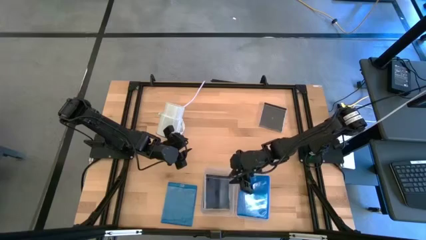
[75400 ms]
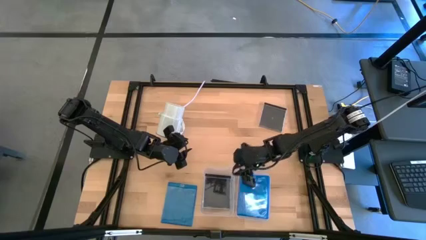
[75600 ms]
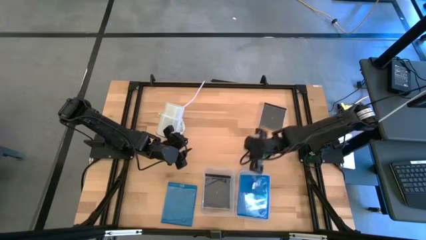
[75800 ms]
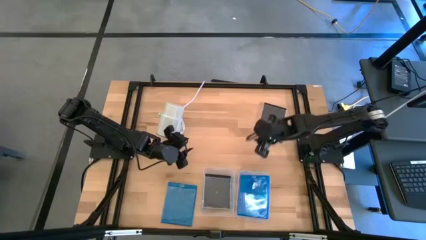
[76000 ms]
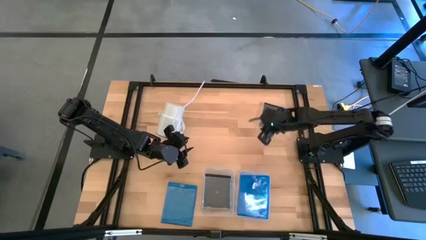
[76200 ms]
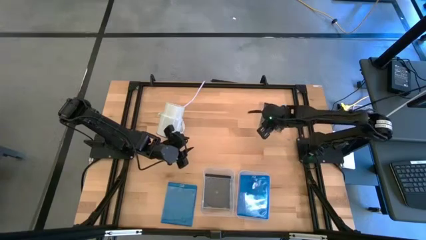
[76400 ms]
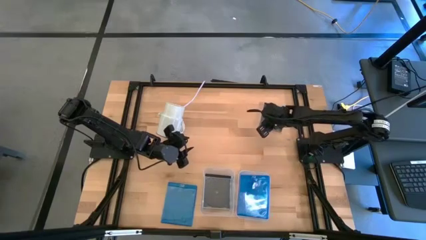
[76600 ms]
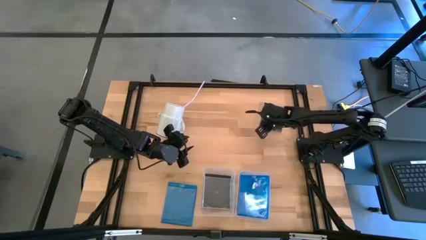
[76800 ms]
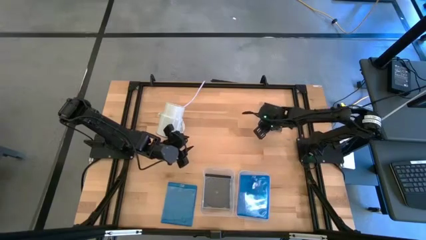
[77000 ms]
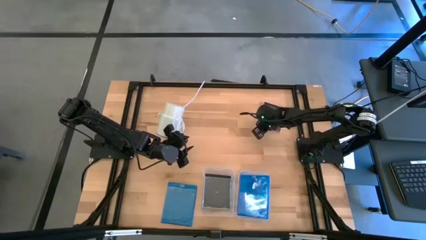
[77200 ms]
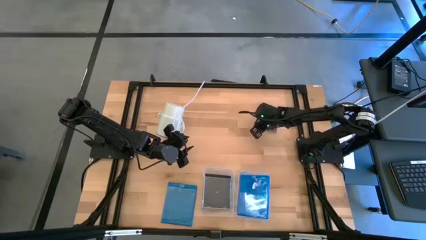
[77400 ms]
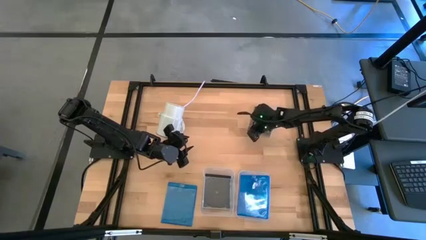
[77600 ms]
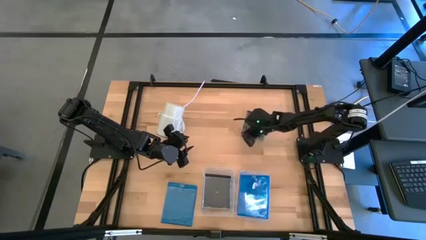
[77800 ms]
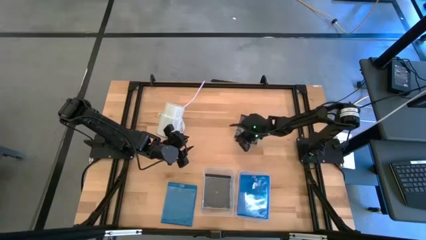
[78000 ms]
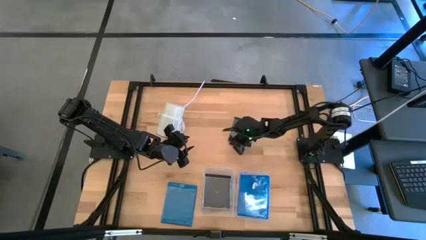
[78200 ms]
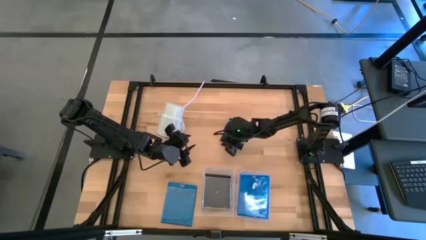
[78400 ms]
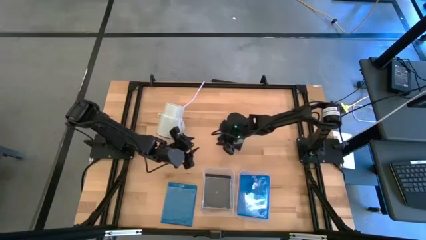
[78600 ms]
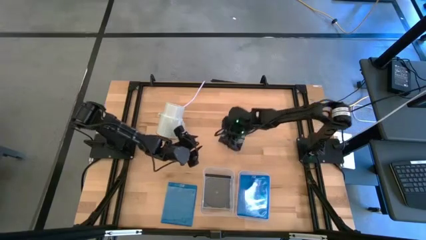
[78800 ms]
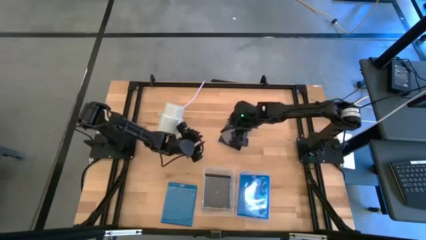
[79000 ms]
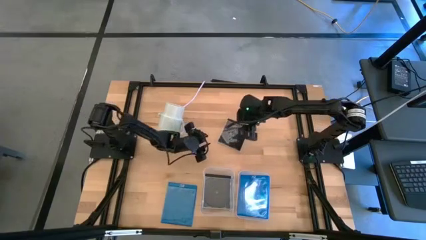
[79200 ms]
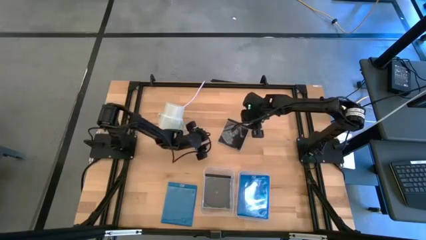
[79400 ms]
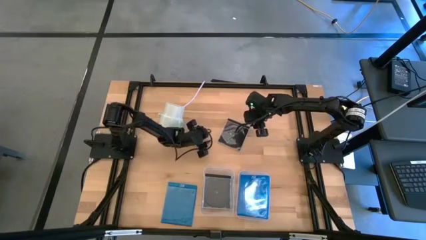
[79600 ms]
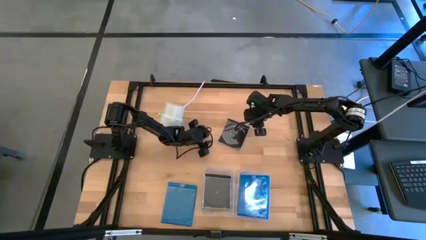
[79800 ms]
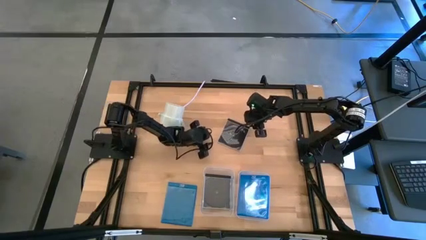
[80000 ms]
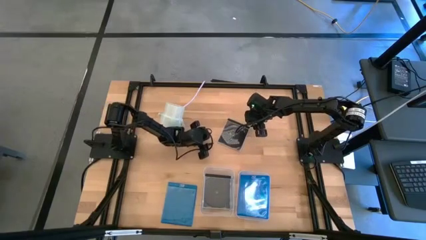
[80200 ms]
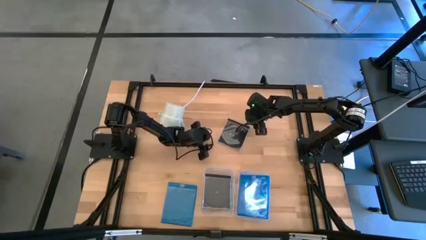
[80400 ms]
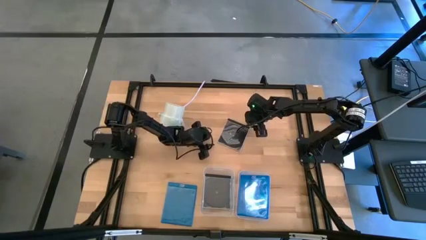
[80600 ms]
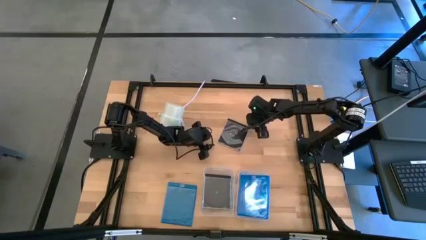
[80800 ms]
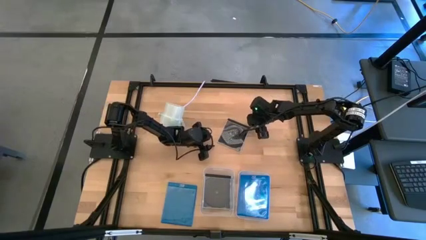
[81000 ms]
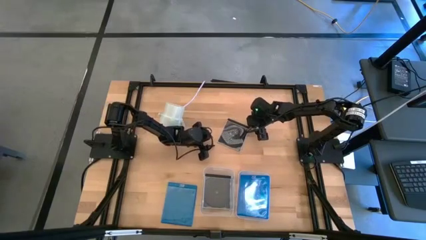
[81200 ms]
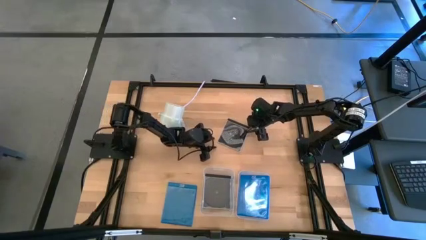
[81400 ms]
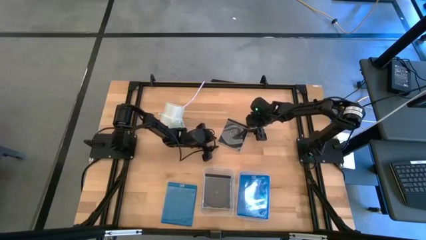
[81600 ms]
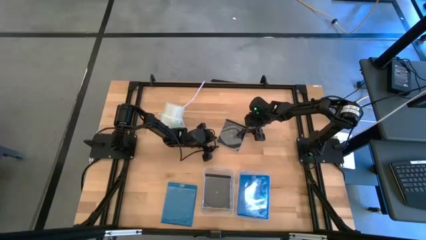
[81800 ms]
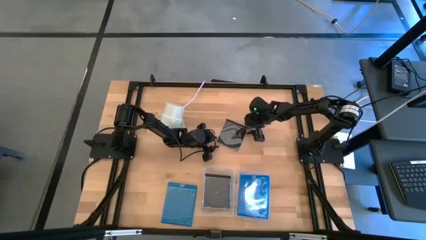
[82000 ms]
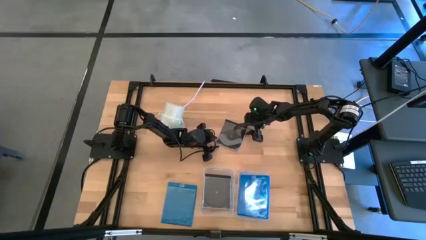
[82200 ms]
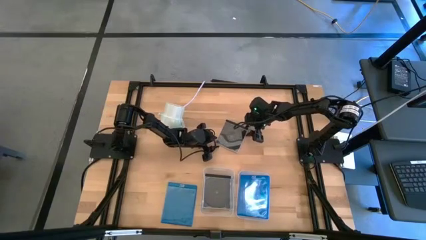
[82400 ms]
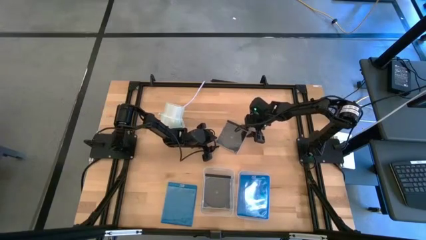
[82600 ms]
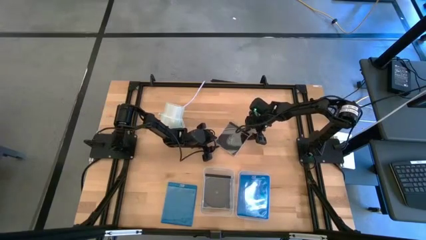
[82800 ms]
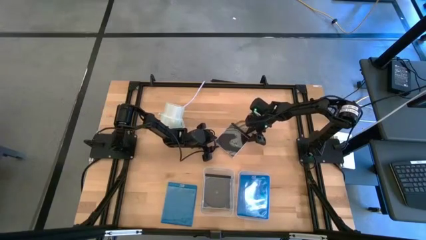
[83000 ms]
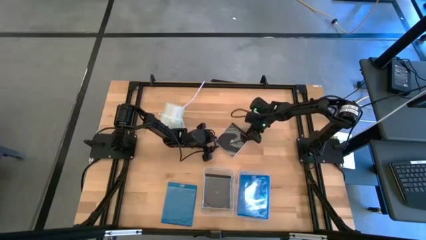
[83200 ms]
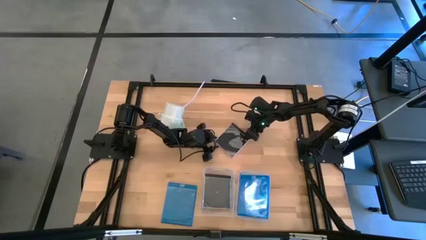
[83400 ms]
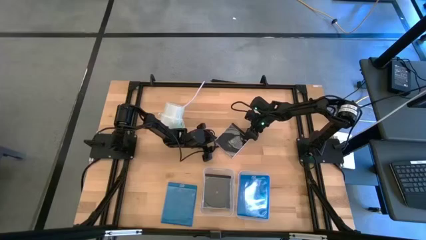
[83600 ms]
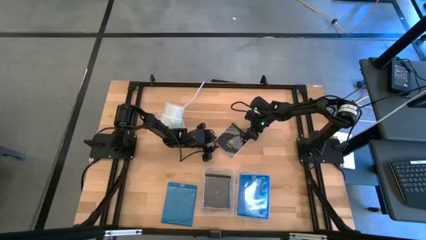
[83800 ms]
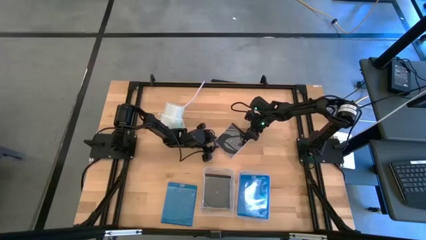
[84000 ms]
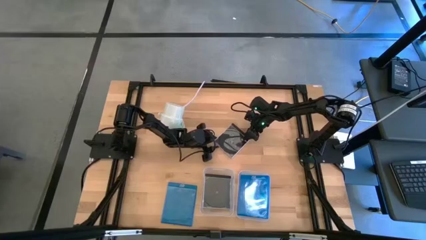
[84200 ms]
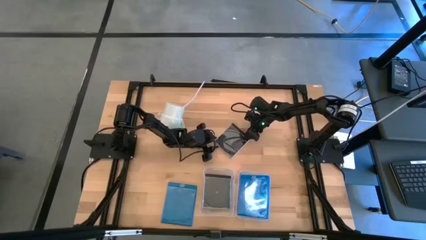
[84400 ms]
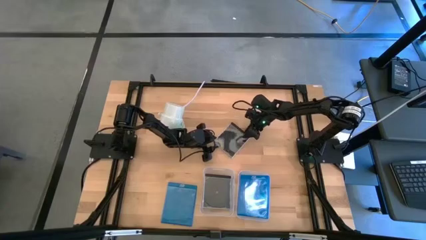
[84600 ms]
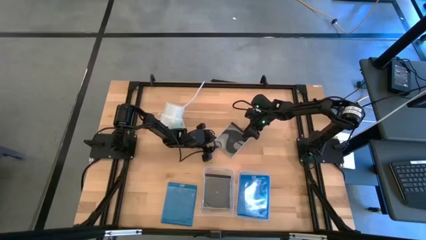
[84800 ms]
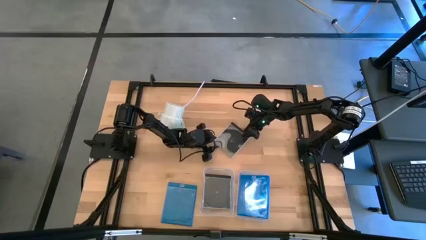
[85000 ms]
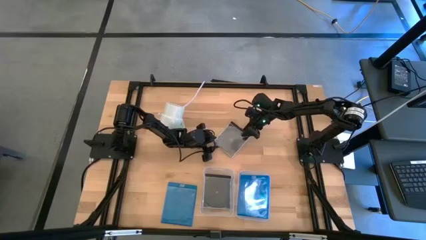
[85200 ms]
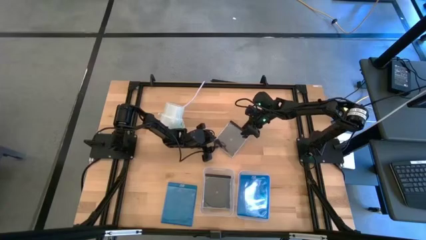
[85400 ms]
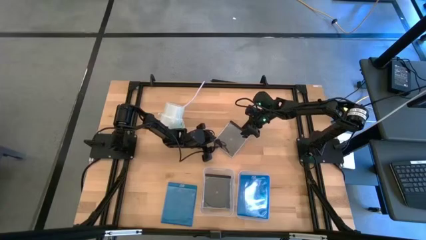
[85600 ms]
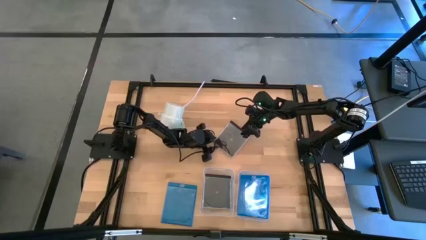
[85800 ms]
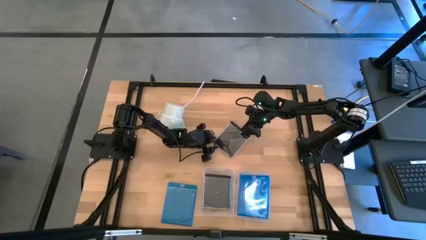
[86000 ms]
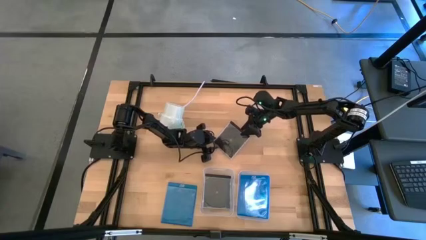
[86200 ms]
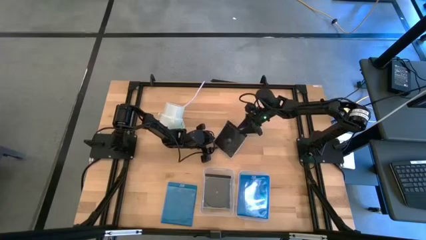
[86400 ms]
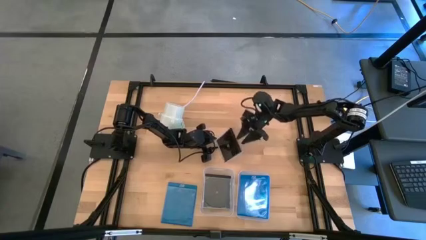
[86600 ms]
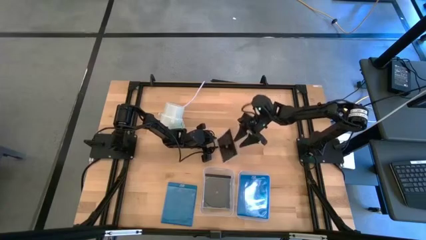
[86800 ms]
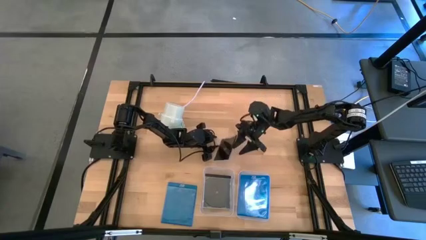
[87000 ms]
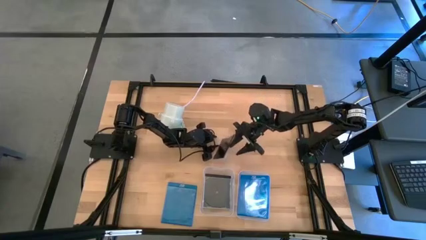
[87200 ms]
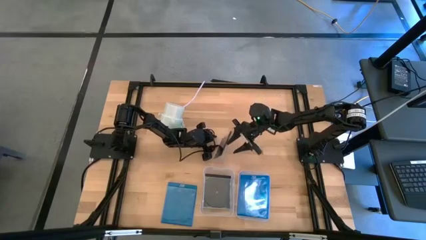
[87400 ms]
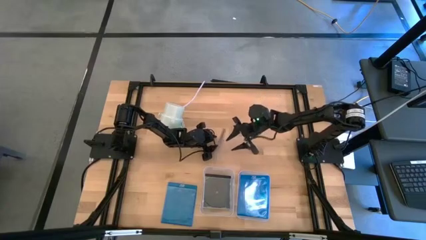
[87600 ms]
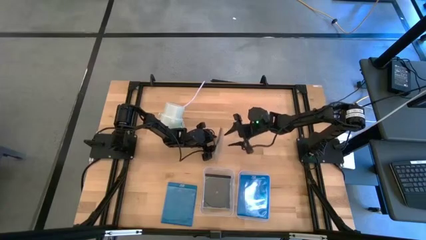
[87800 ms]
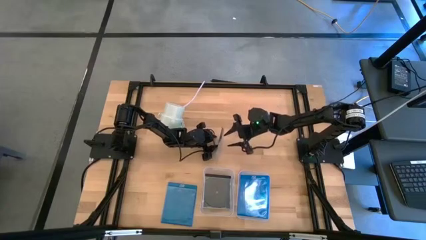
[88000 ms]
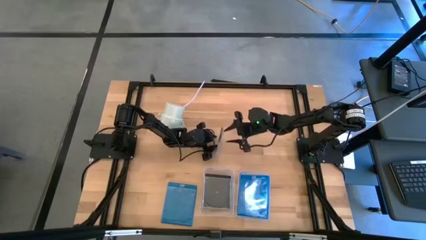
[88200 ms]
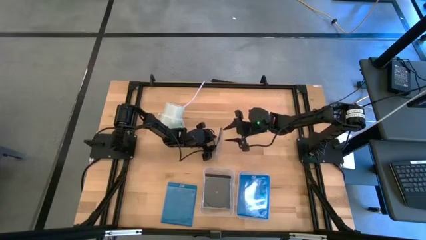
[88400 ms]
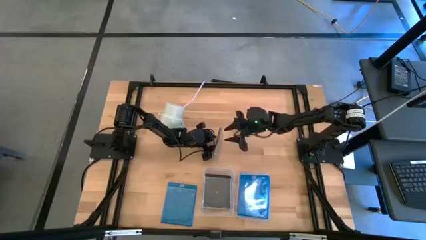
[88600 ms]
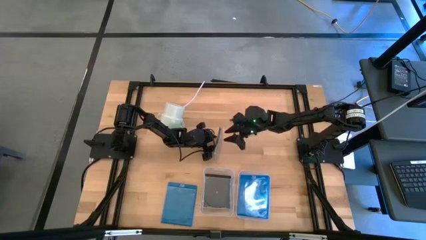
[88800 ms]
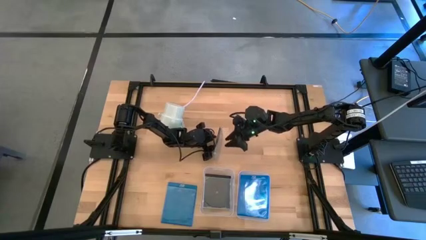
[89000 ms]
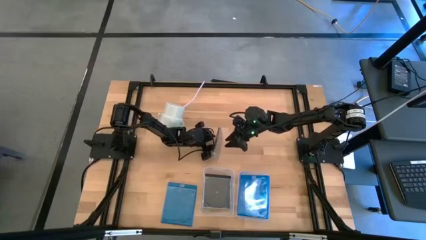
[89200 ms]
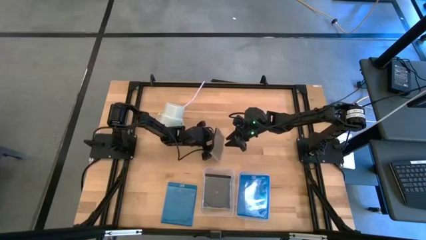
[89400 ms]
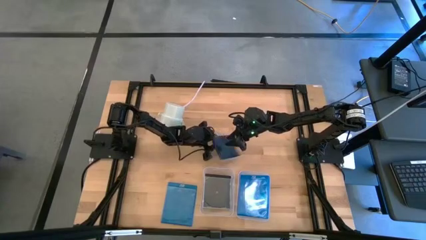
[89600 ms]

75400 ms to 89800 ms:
Task: Pick & place jewel cases by type
Put the black cd case into the left transparent bin
